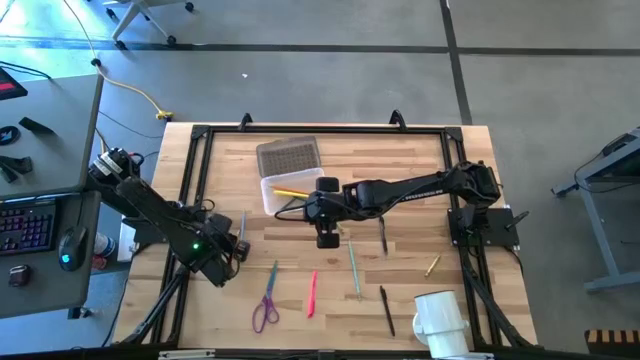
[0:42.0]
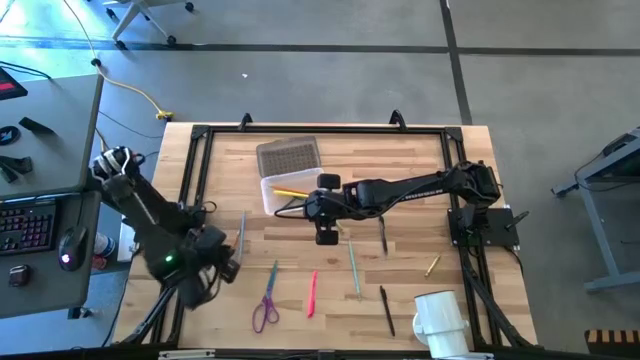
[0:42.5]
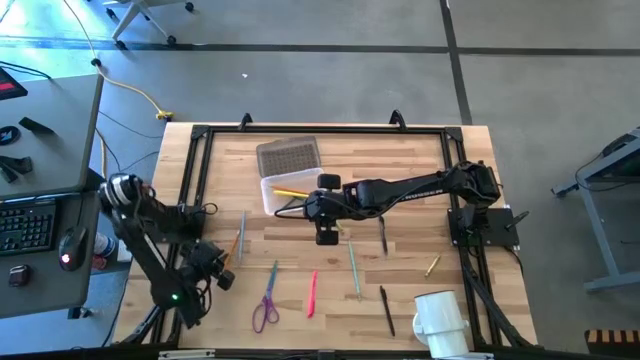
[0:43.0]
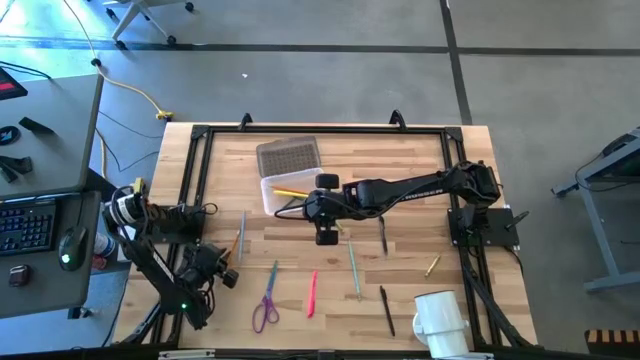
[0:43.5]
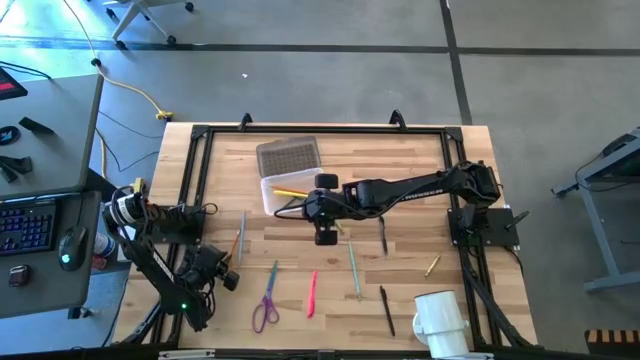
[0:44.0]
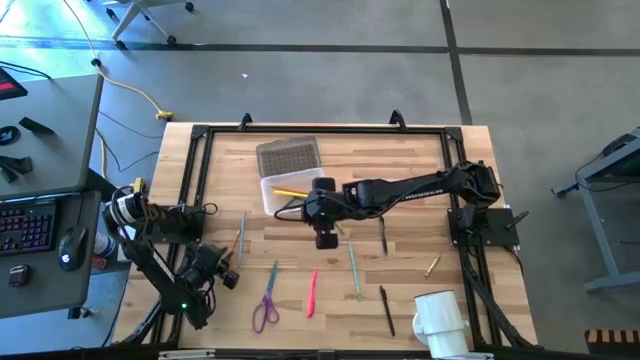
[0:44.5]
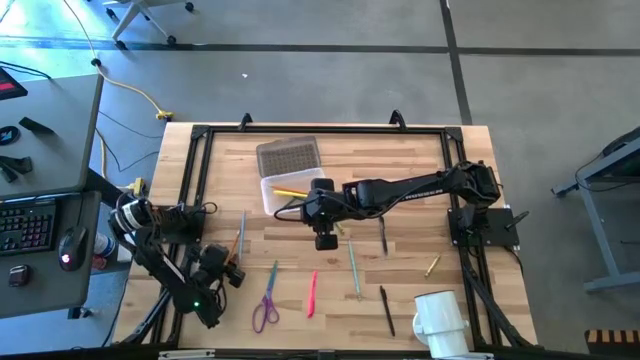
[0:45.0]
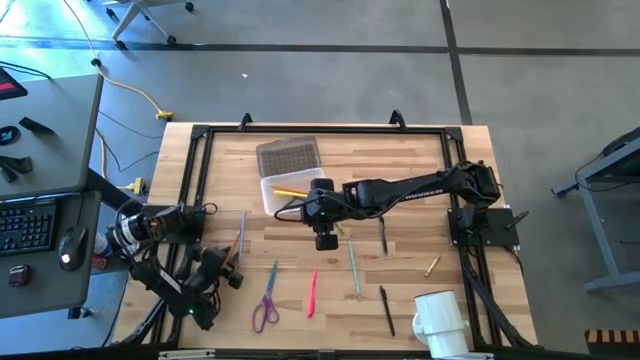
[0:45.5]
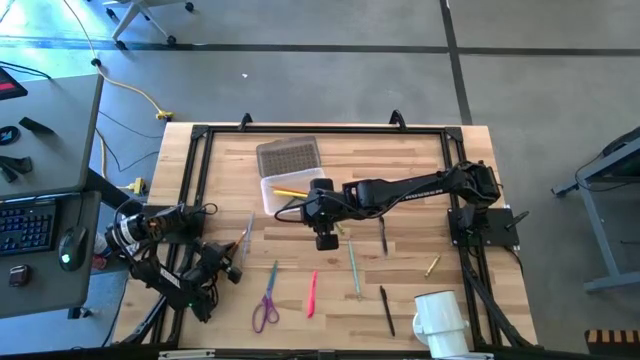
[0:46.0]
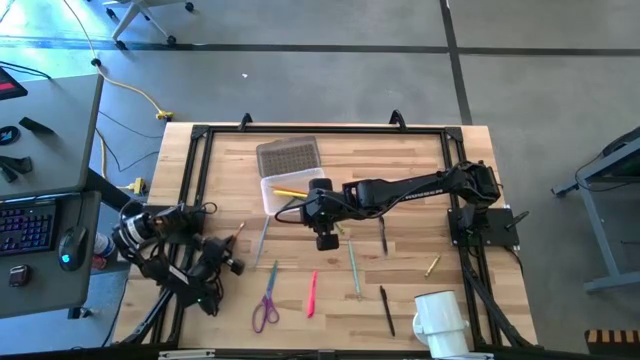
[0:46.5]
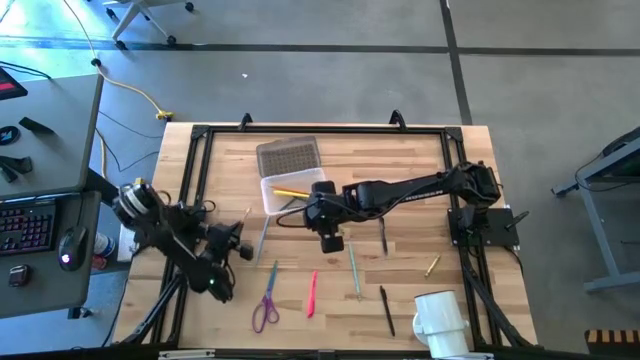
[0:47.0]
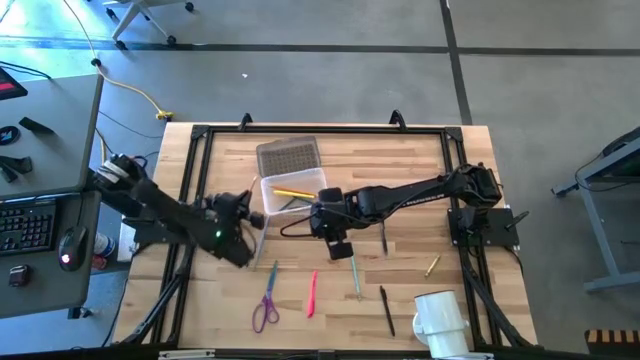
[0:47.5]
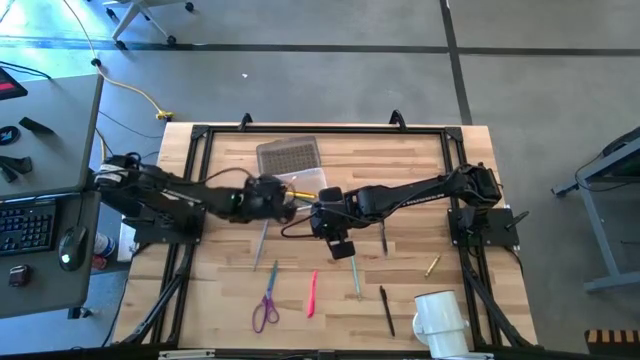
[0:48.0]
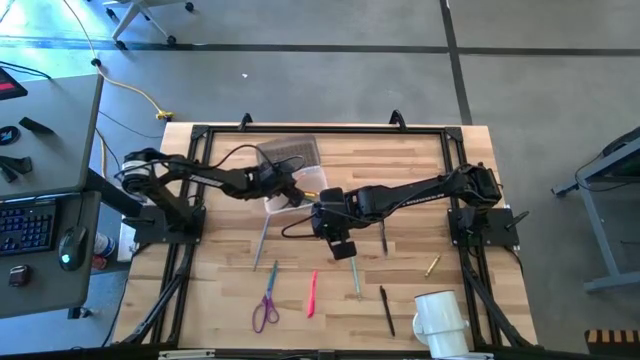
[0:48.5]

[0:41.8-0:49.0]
Task: Pick & place school supplies into a supply box
Put the orange pencil into the transparent supply box

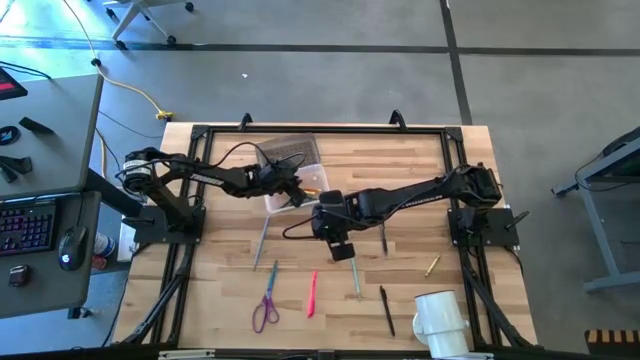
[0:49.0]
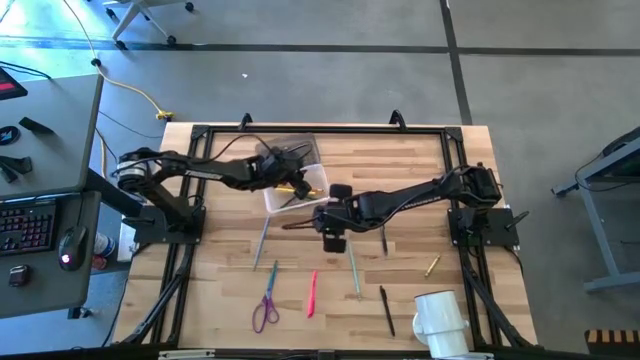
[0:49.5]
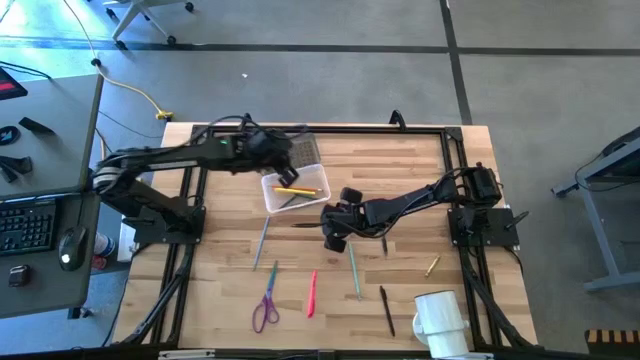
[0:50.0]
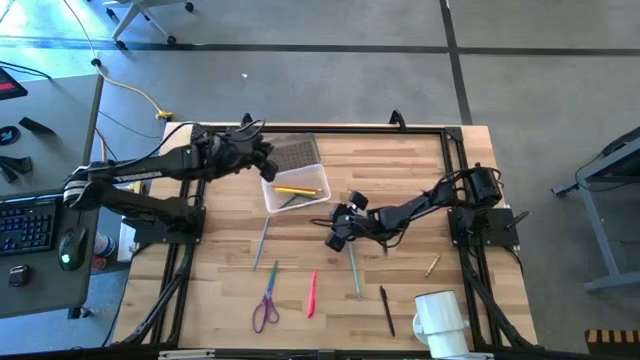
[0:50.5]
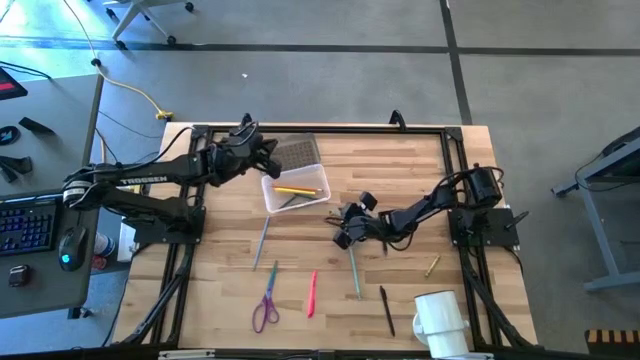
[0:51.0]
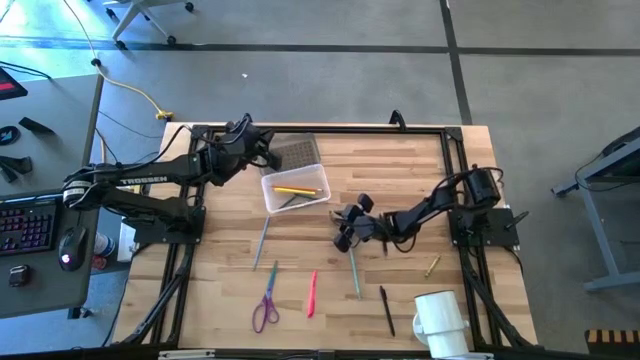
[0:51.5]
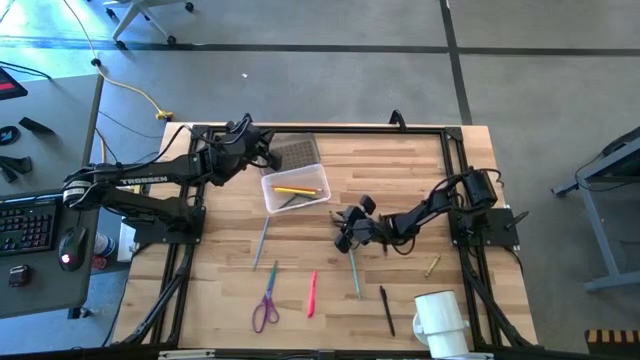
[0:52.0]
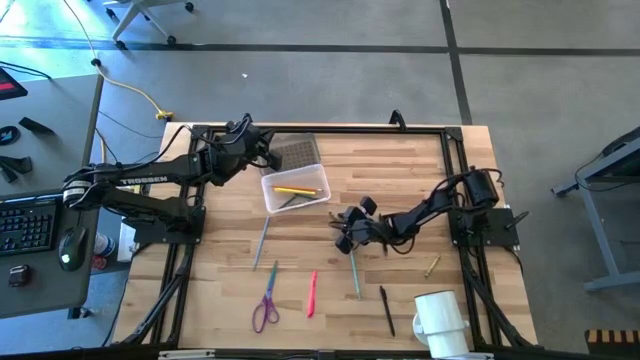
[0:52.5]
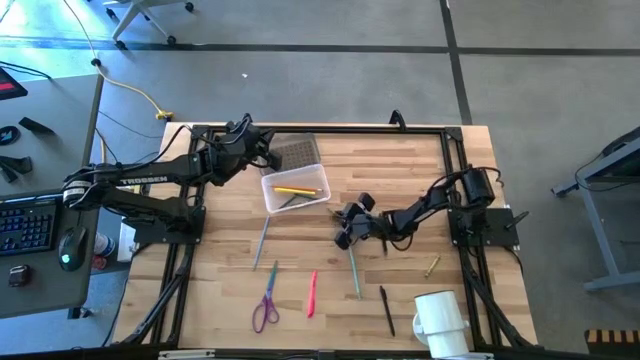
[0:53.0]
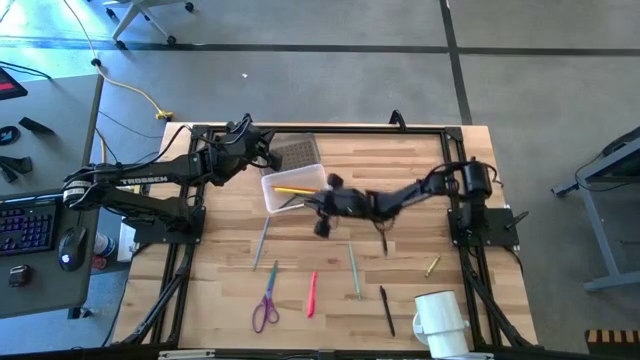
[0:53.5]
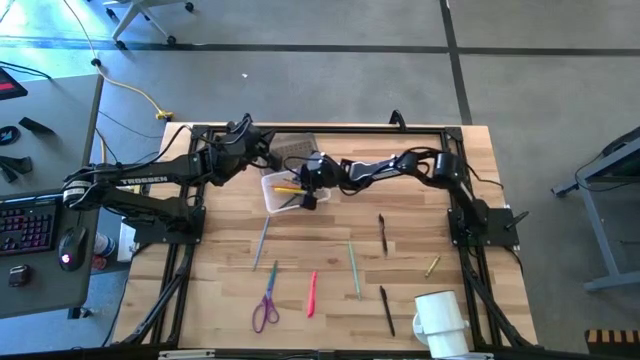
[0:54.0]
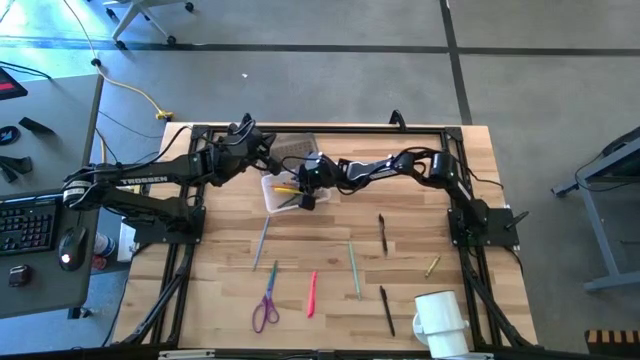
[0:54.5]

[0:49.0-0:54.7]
Put the left light green crayon into the transparent supply box

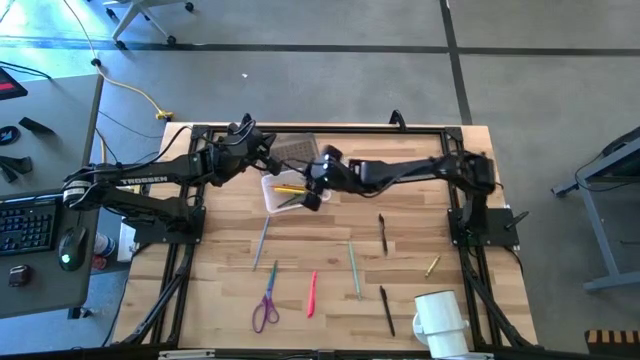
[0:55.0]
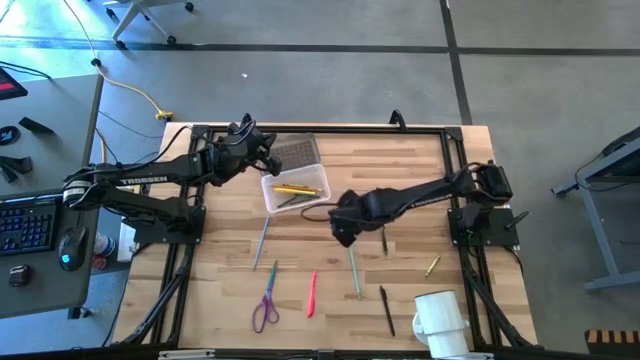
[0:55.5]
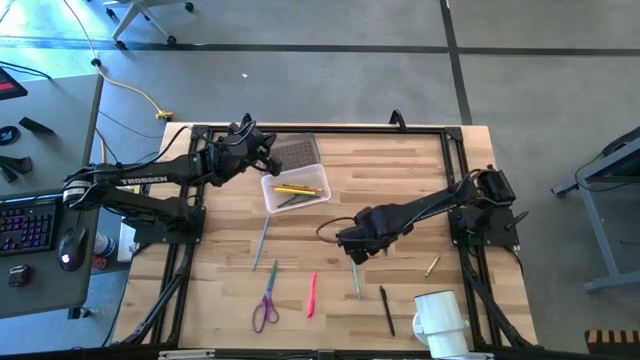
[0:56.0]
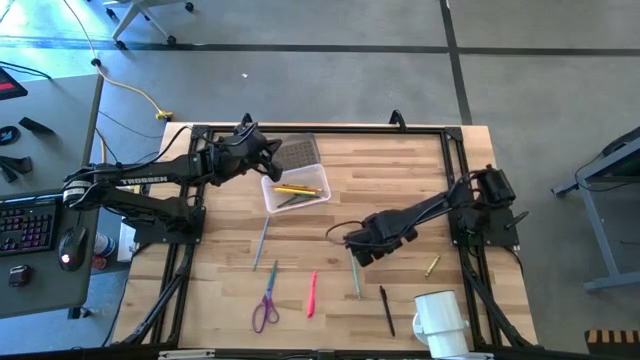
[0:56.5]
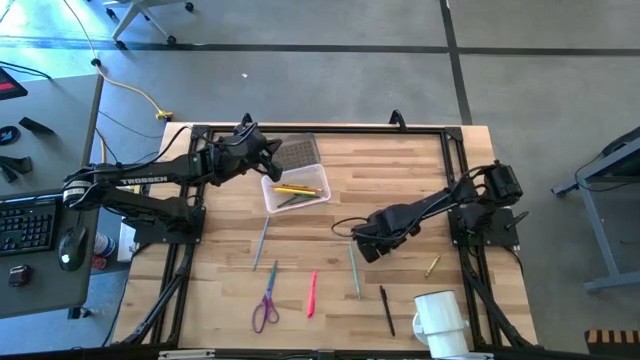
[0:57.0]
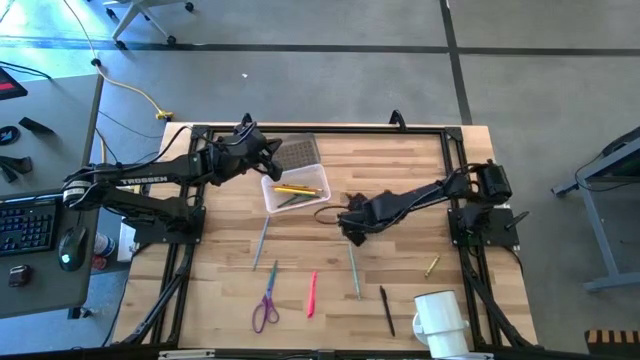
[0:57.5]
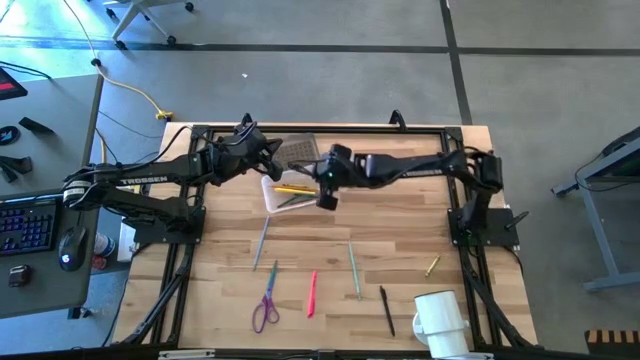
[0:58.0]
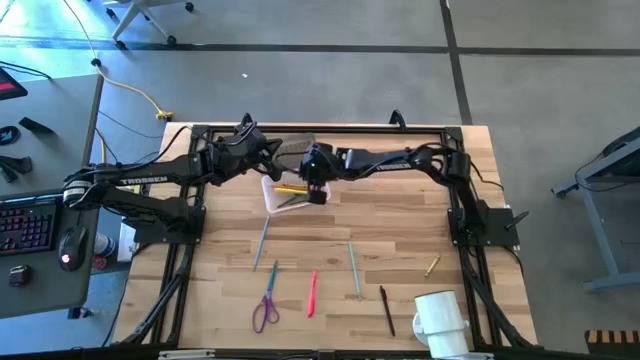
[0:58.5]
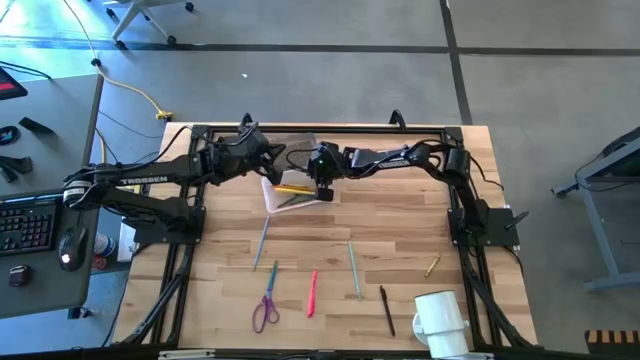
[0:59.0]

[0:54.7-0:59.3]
Put the transparent black pen into the transparent supply box

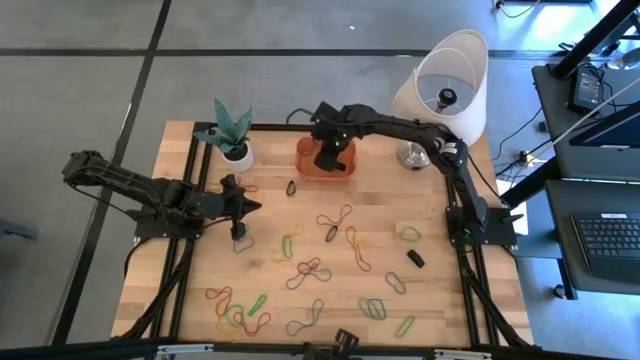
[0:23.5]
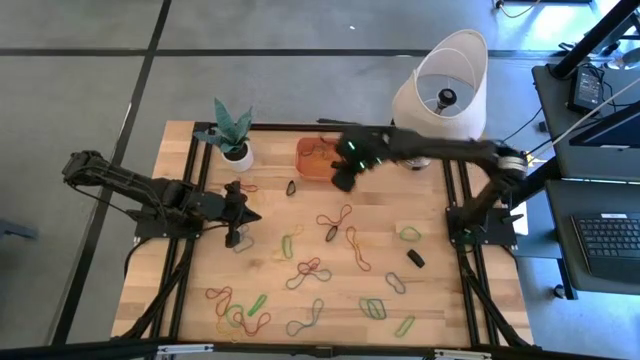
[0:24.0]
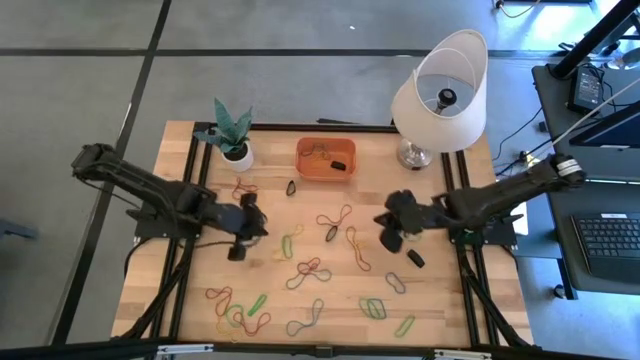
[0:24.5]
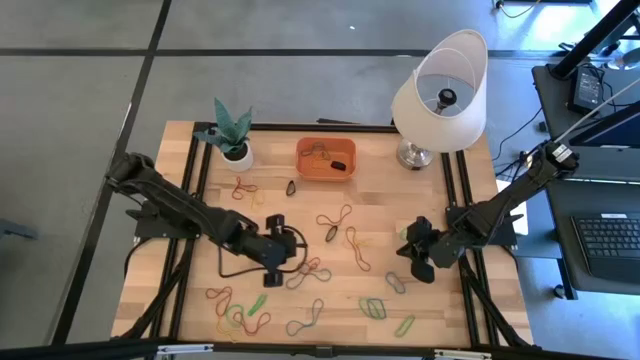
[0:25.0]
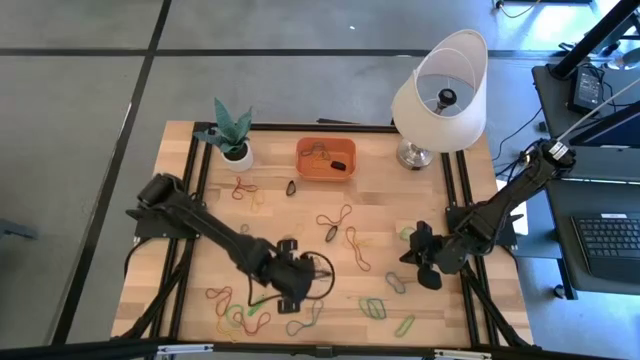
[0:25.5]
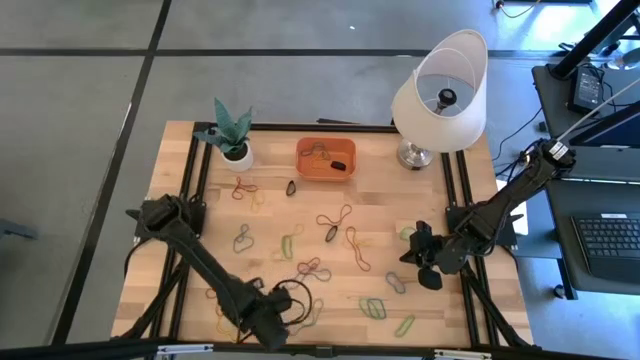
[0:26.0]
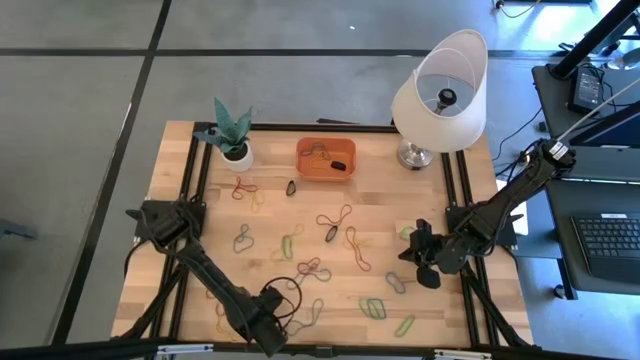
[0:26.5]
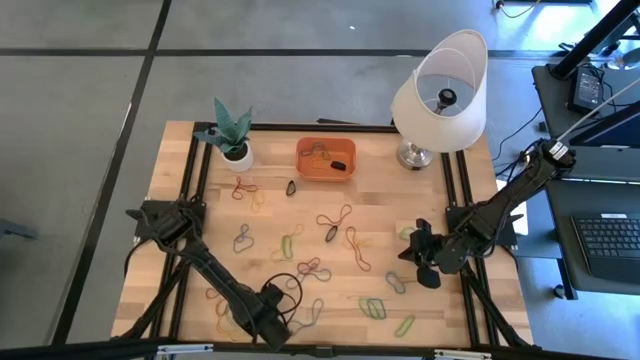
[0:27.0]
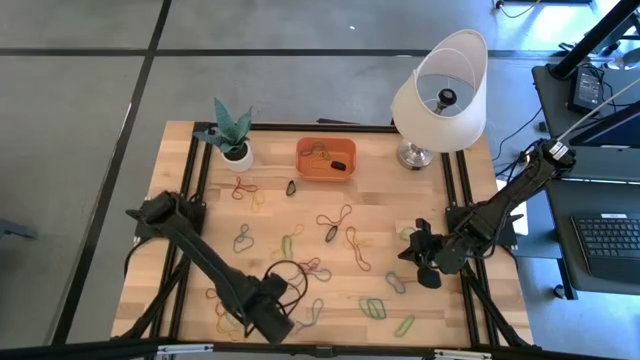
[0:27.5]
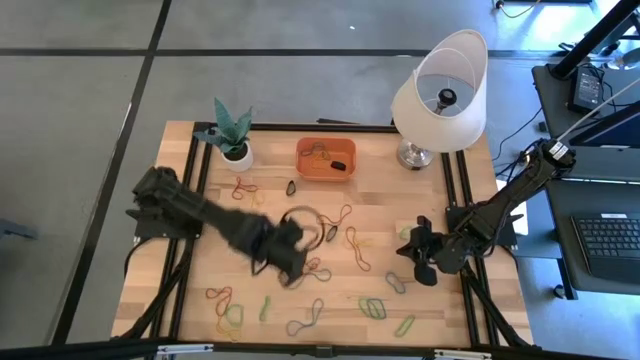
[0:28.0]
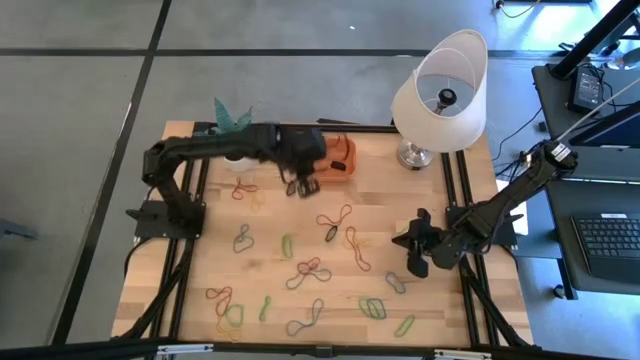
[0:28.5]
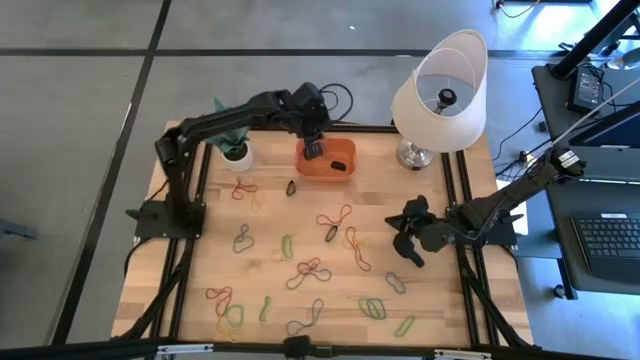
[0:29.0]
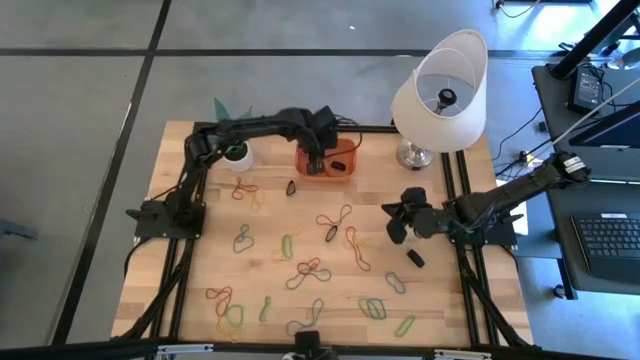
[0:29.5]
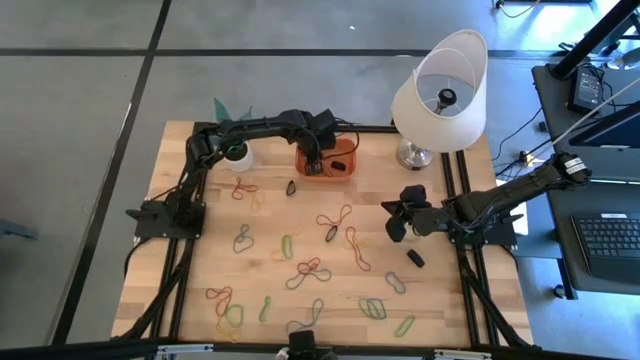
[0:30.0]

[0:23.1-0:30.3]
Task: Pick and place rubber bands into bin
Put the red rubber band into the bin
